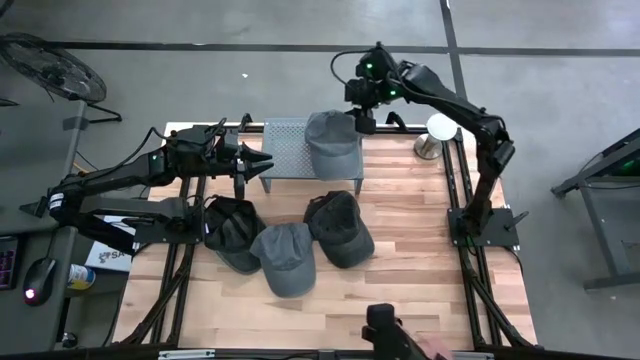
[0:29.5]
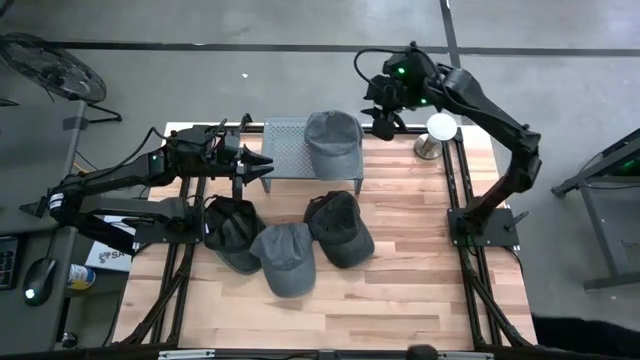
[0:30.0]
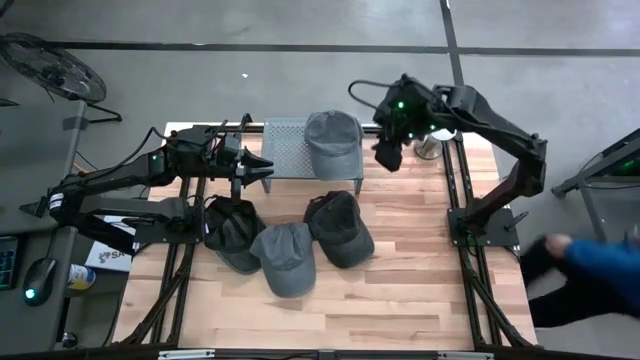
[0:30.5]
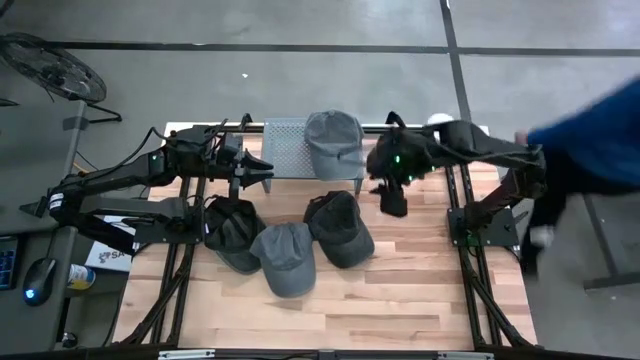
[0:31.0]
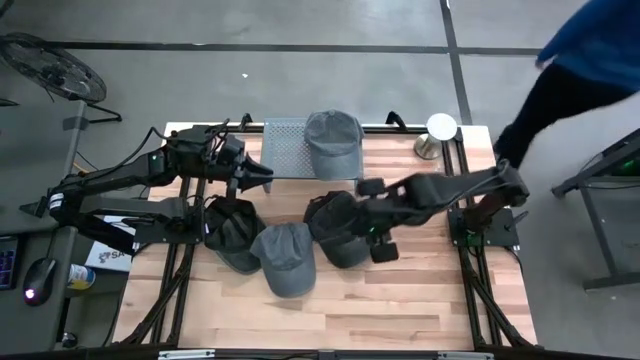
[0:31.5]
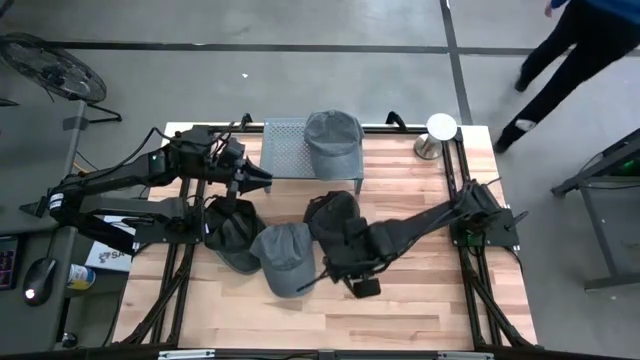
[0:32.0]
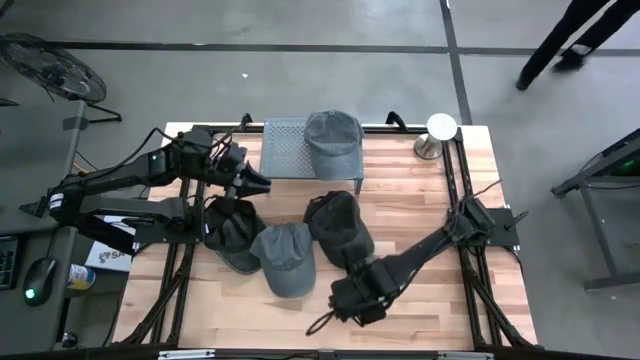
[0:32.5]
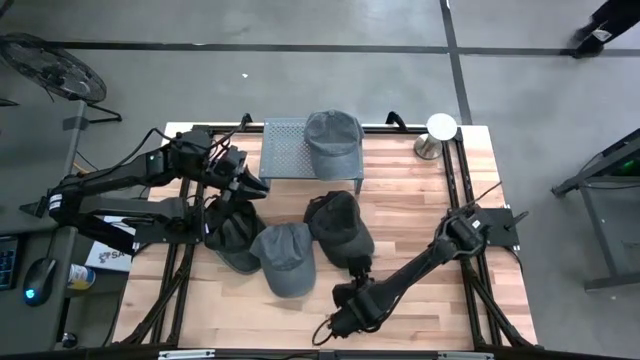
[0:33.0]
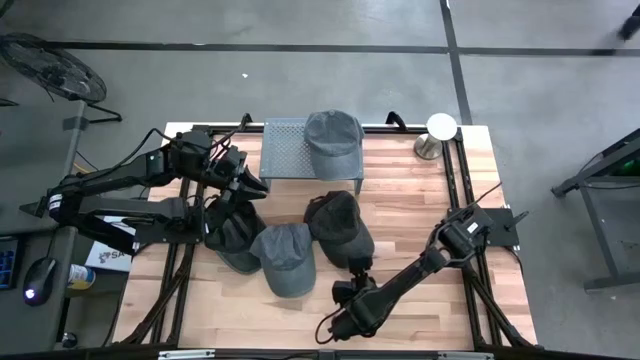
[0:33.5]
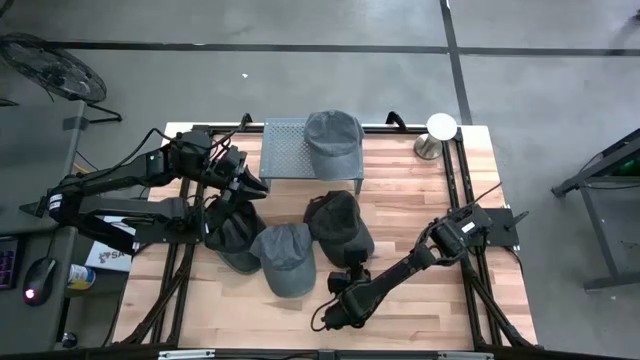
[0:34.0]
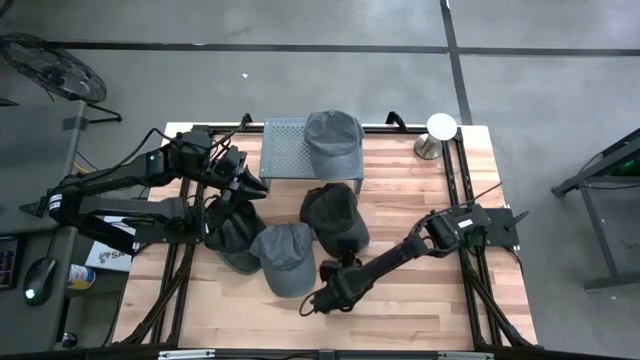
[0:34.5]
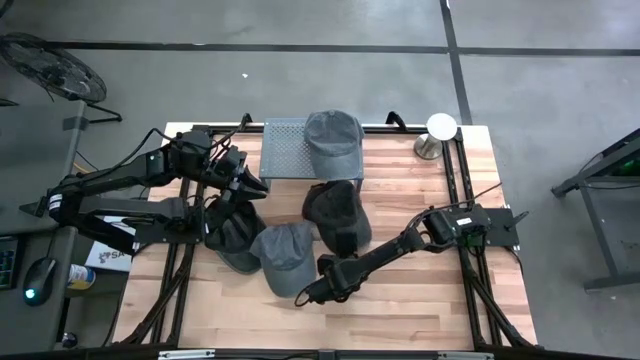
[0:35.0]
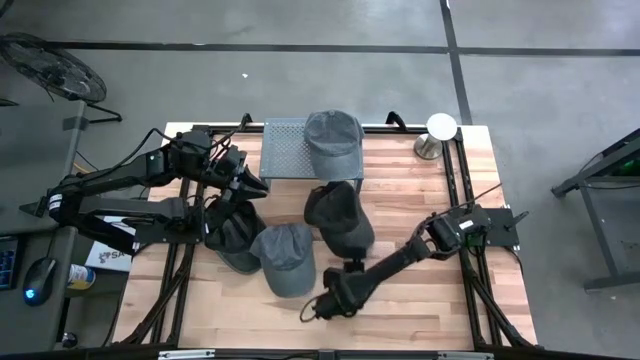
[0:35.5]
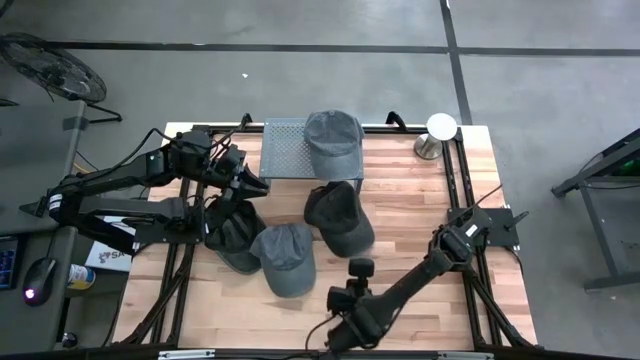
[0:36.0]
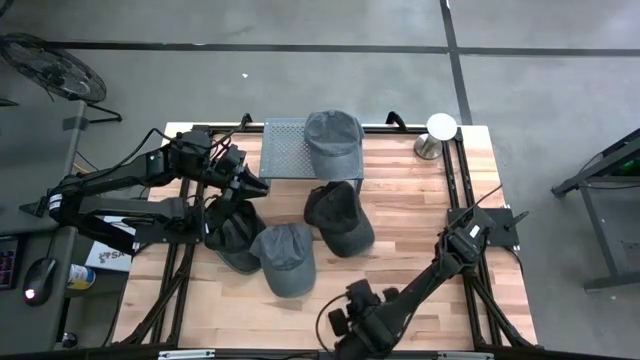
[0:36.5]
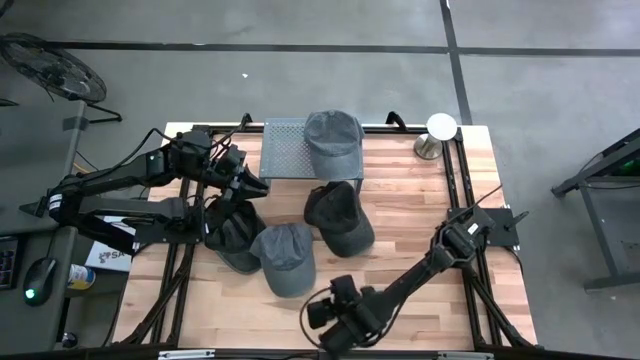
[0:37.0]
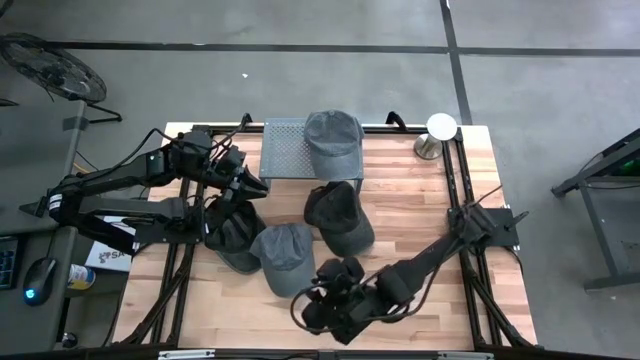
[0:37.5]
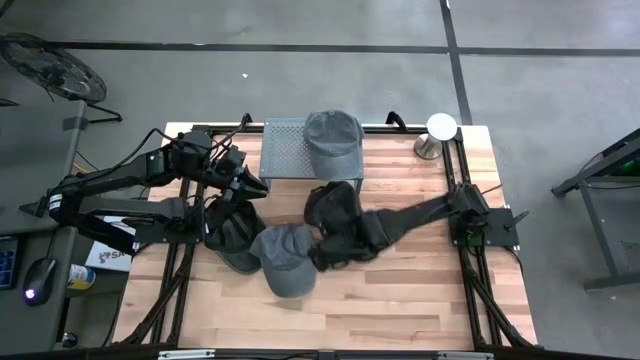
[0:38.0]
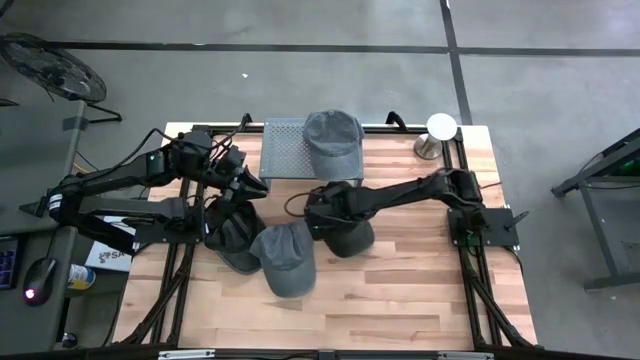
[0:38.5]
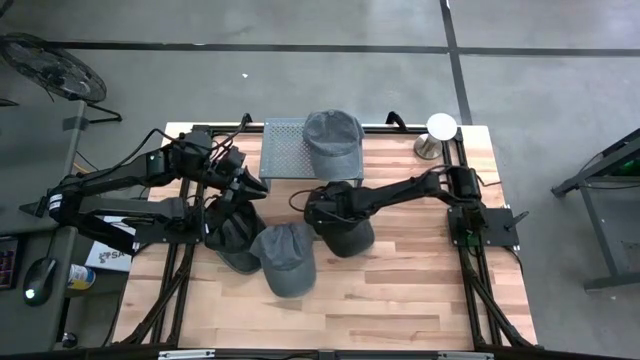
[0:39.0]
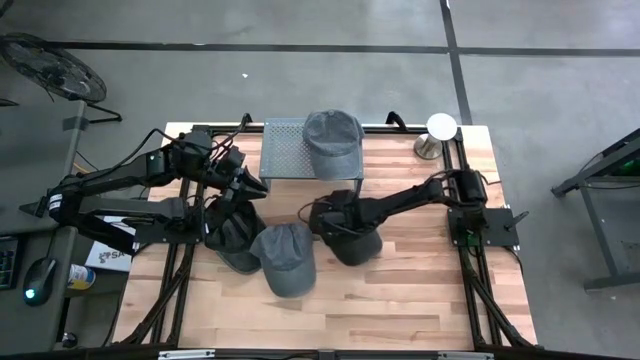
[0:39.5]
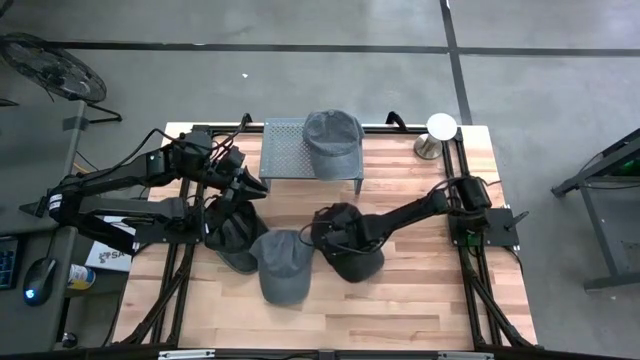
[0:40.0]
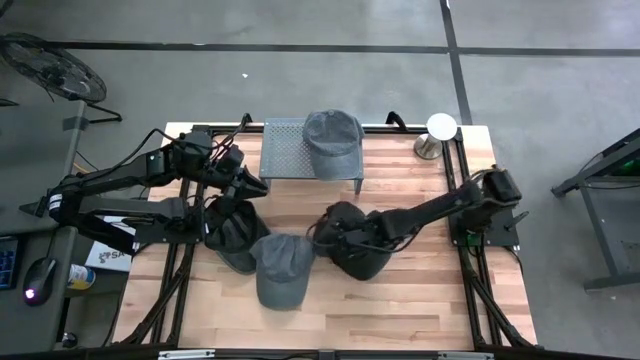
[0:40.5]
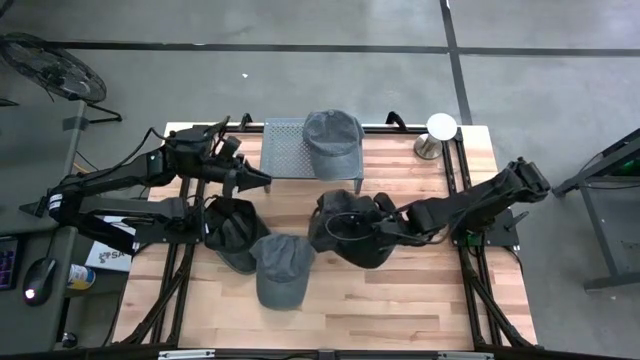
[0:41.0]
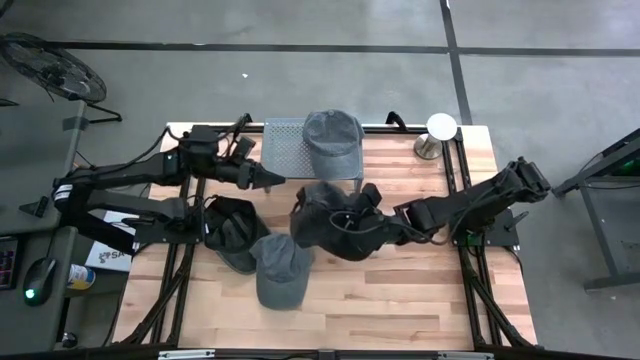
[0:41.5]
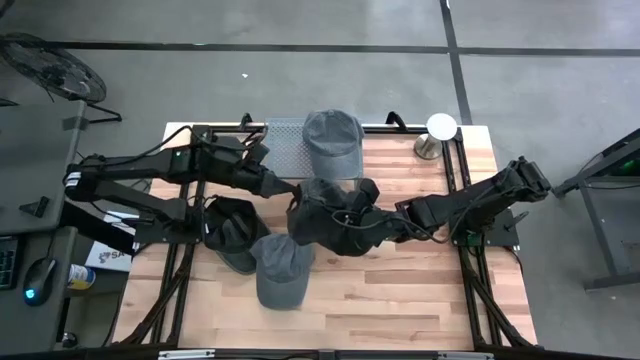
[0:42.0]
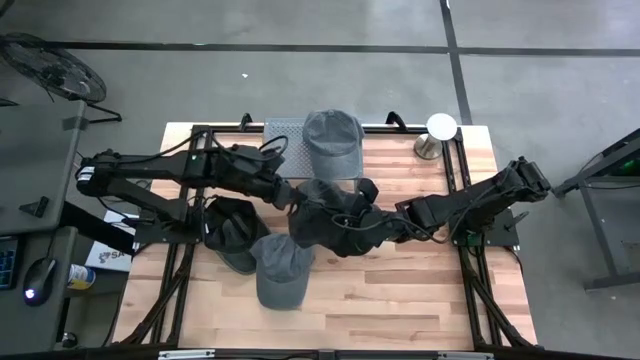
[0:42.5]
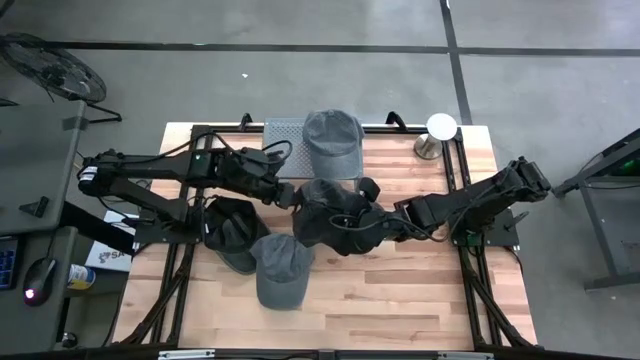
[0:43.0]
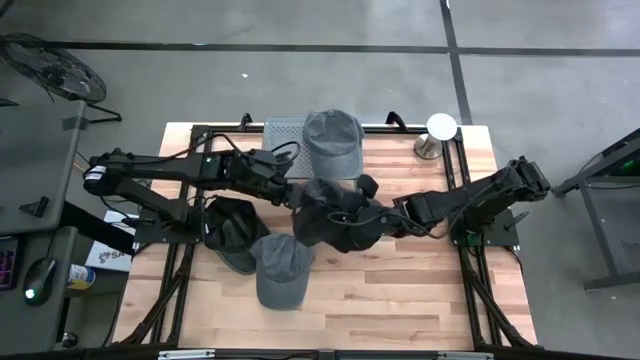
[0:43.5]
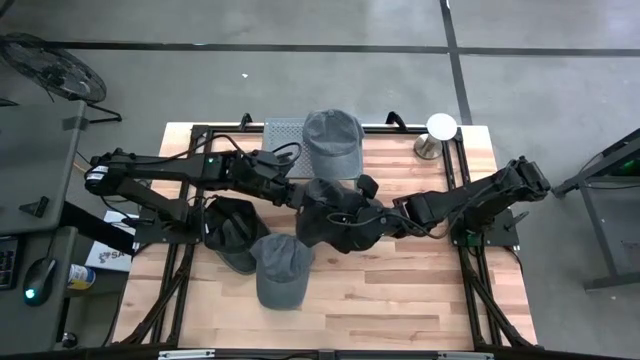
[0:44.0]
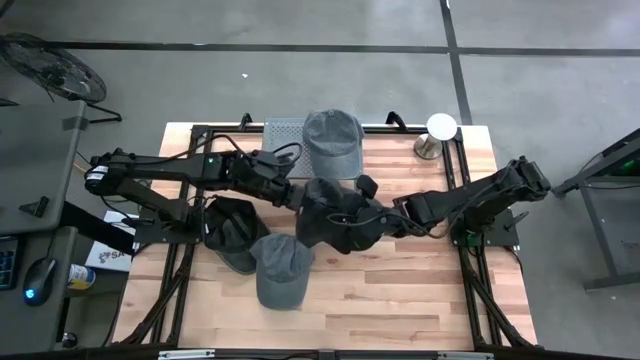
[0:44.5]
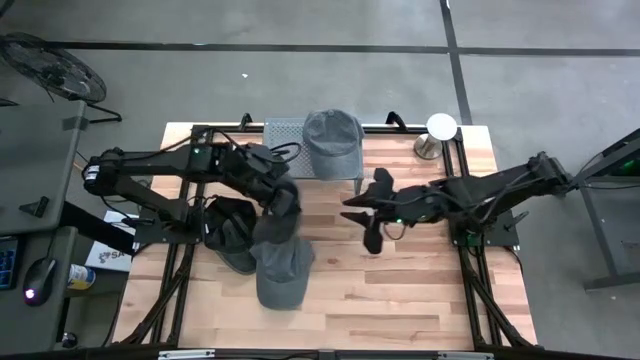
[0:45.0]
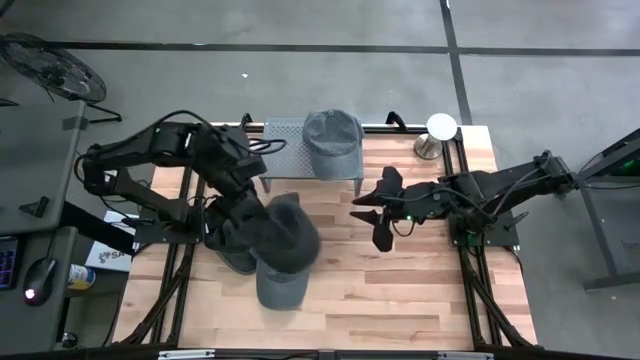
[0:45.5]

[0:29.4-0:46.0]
Task: Pick & Place hat
Put the right black cap on the shelf

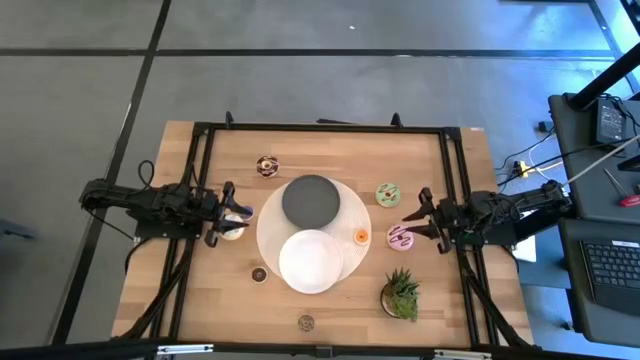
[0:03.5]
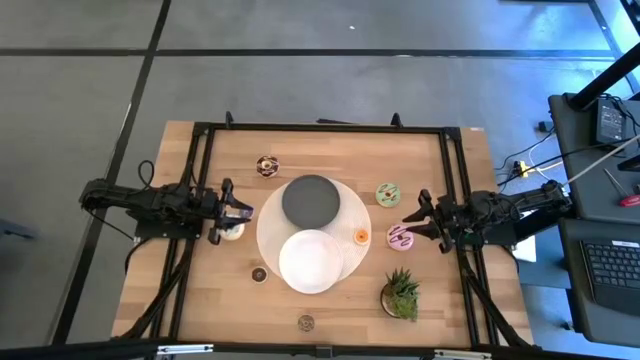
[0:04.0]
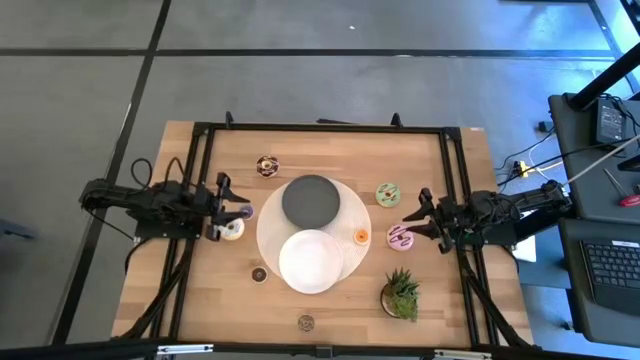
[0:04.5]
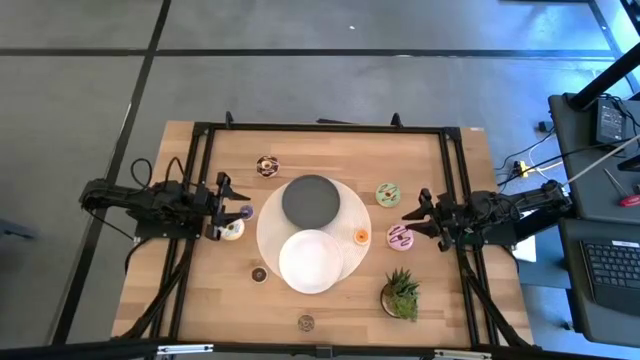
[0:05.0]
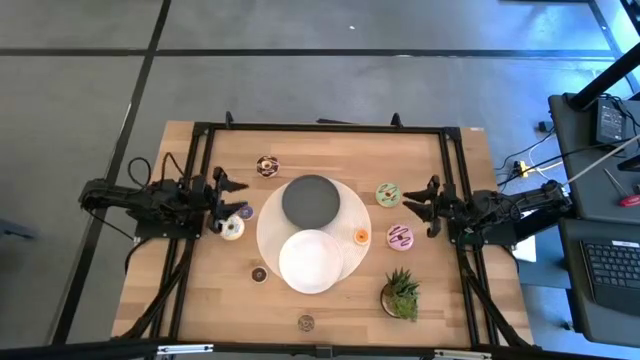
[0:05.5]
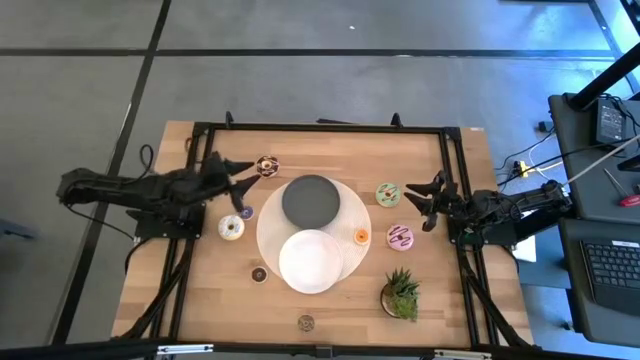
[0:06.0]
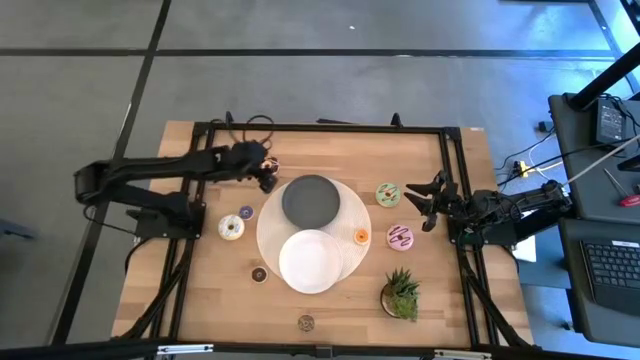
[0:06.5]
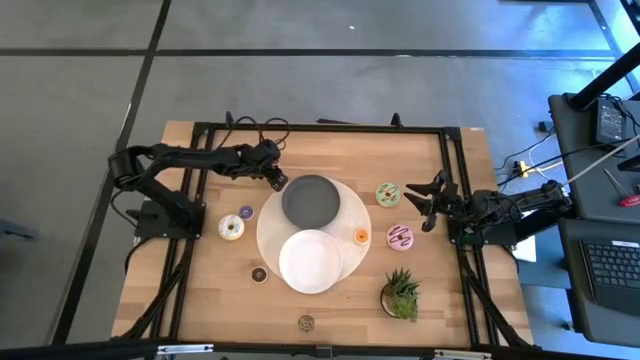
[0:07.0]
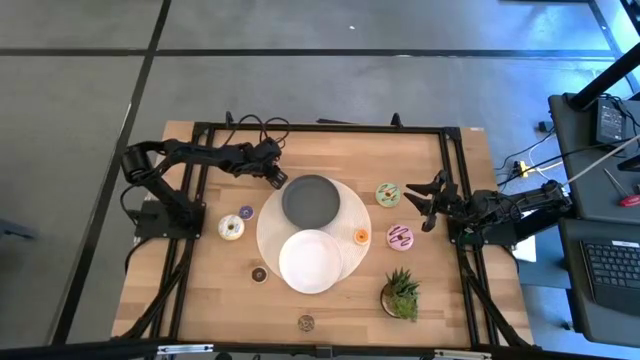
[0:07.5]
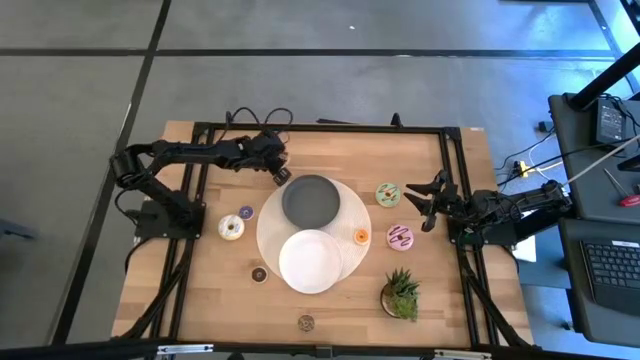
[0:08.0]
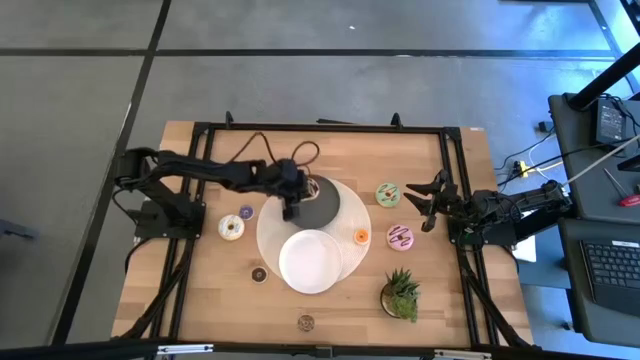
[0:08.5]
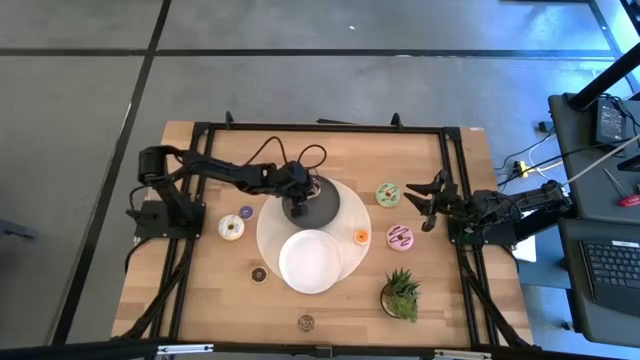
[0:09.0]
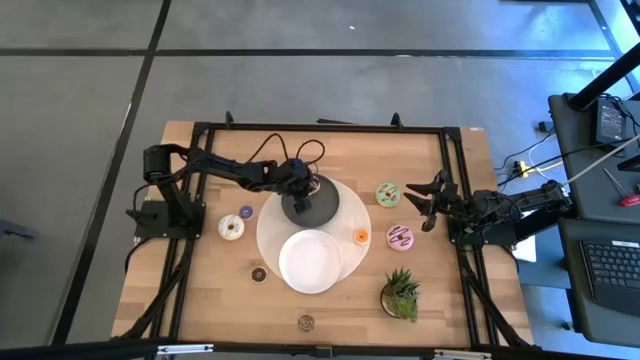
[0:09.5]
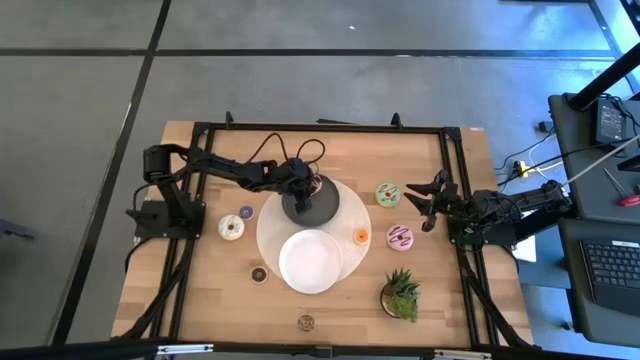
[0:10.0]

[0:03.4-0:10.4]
Task: Pick & Place donuts
Put the big brown donut on the gray plate
